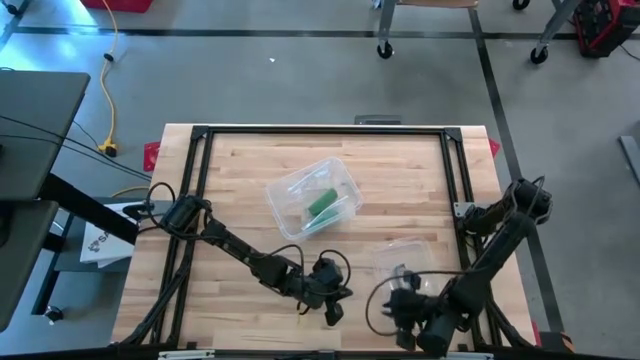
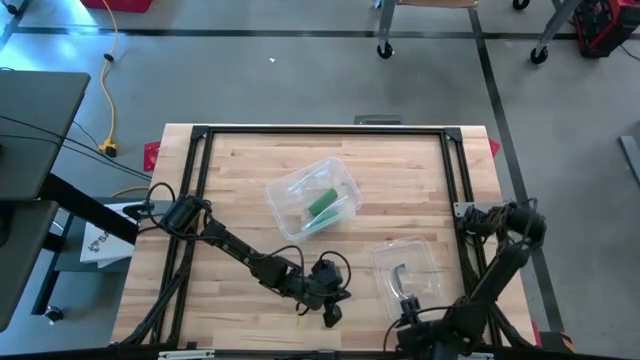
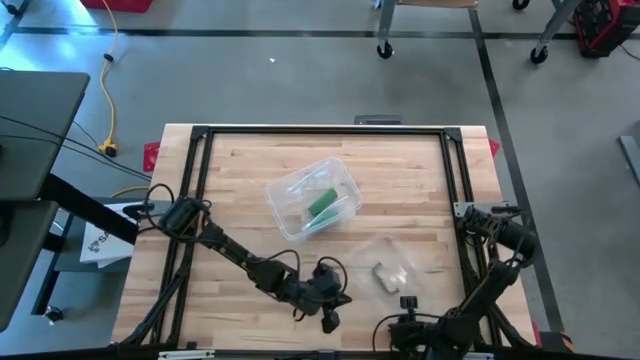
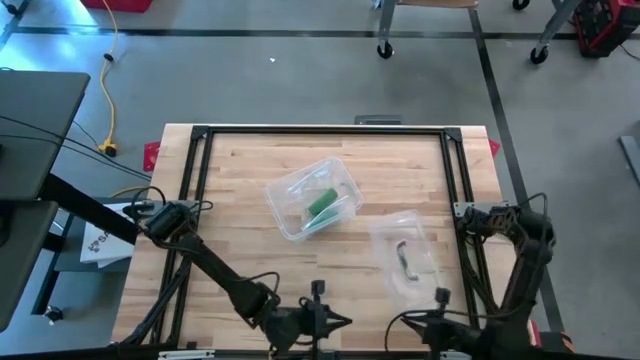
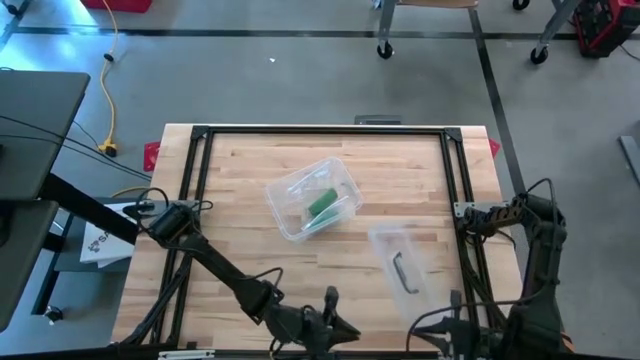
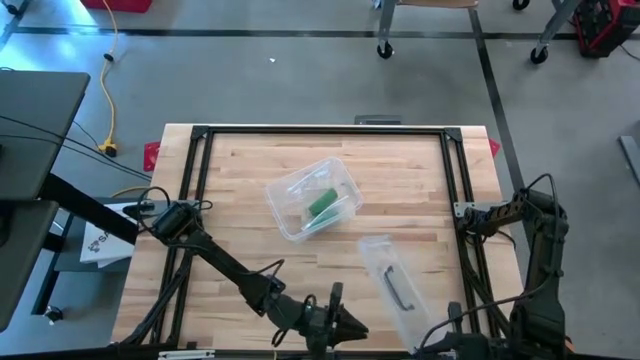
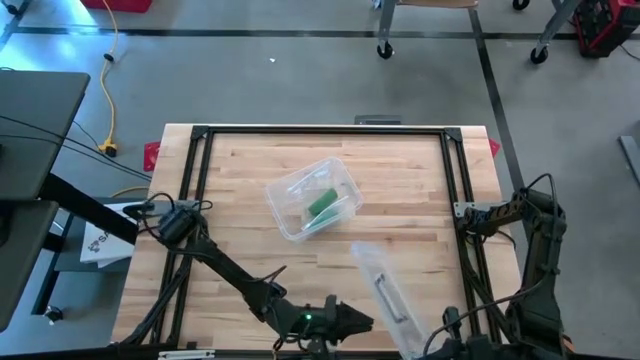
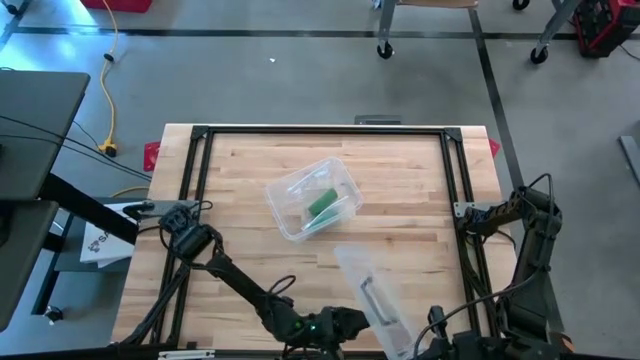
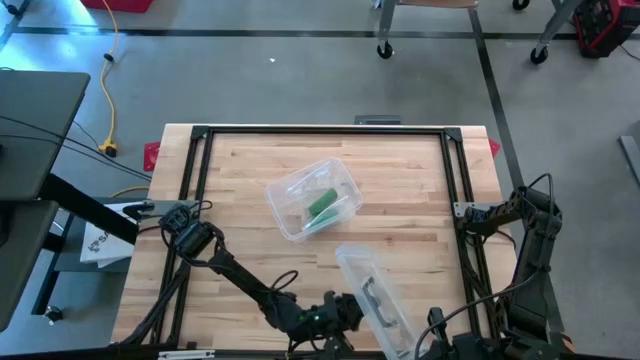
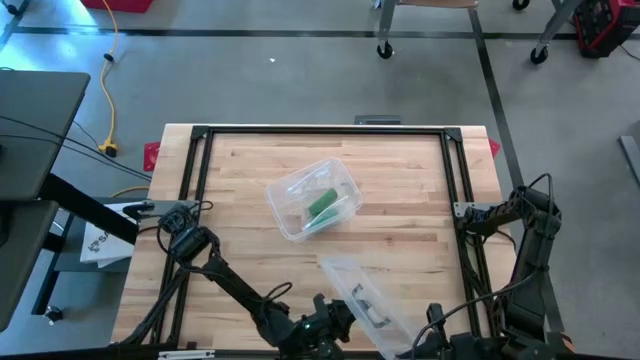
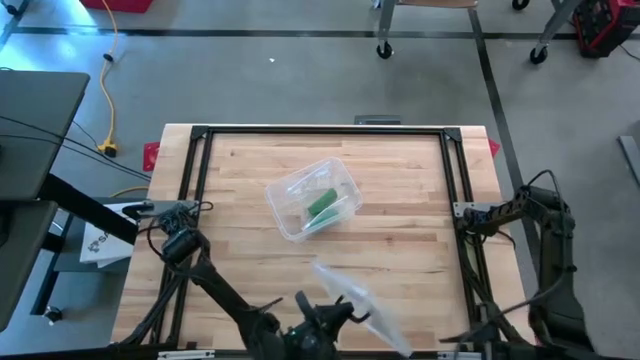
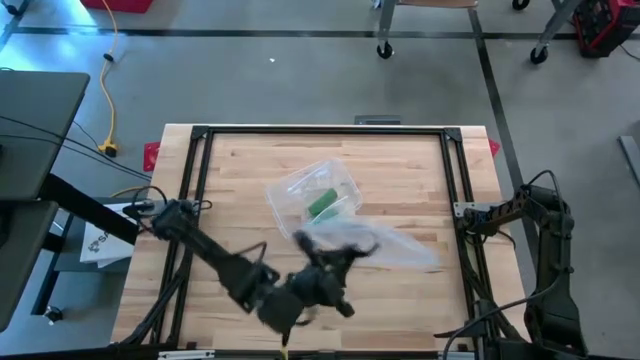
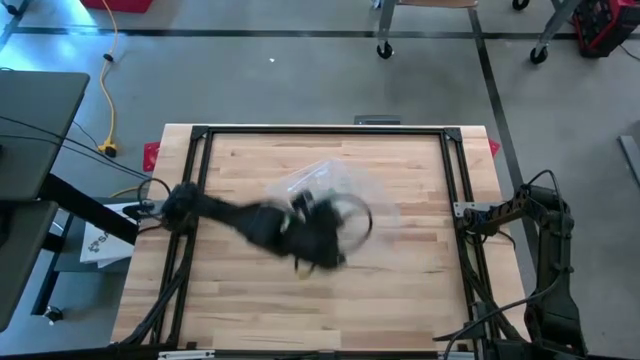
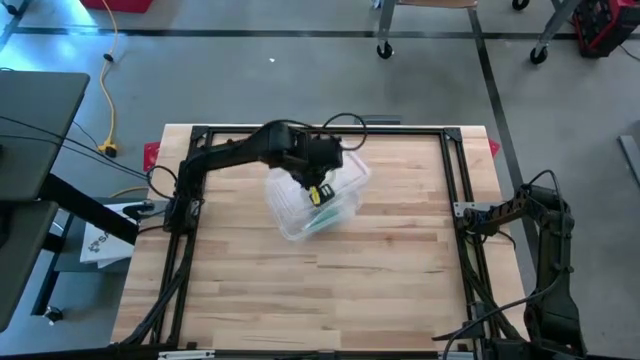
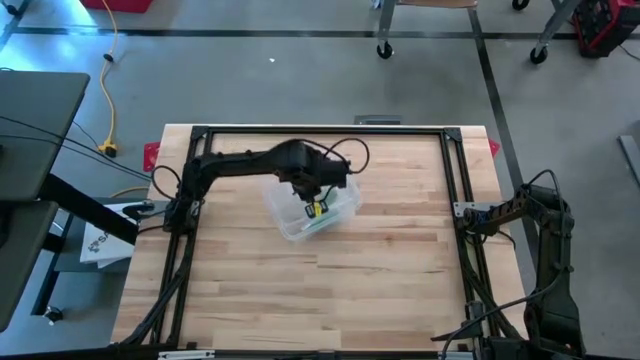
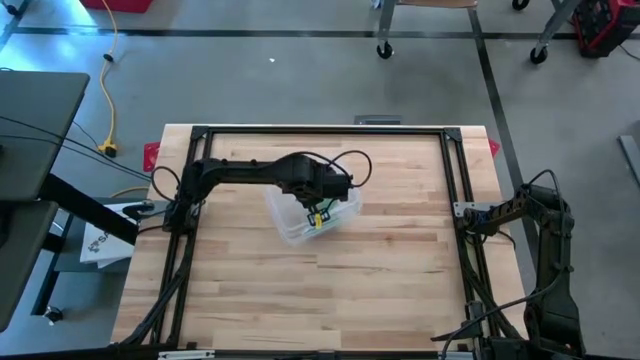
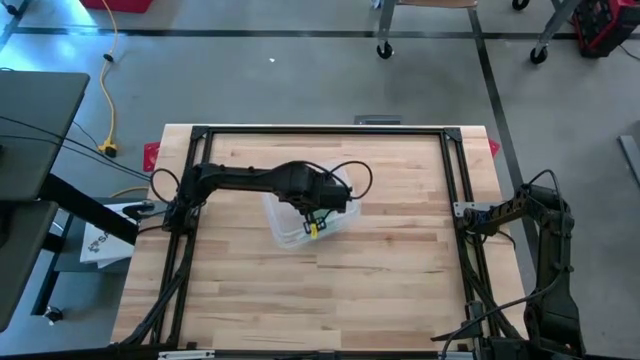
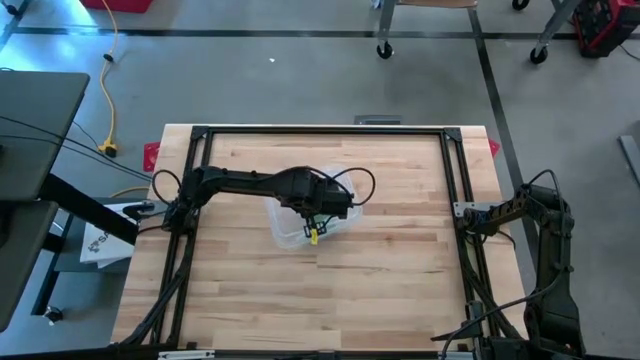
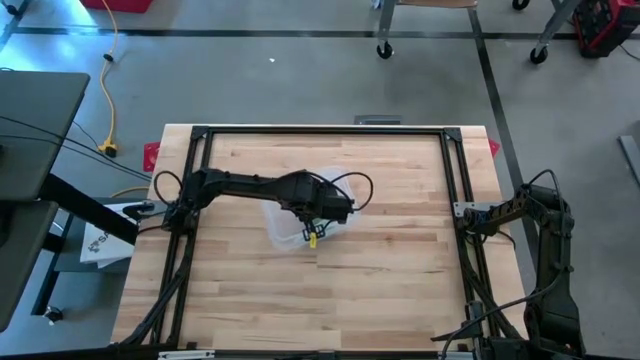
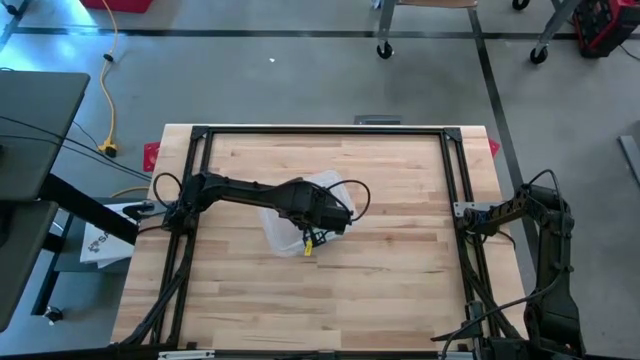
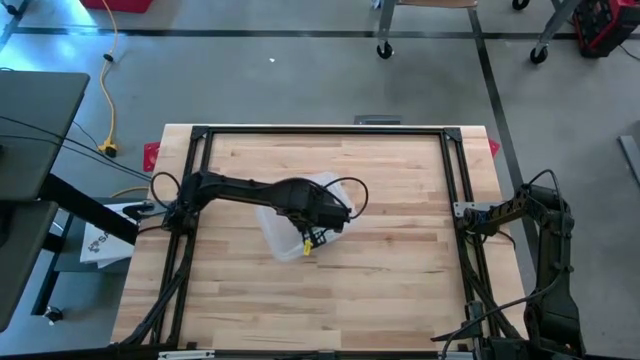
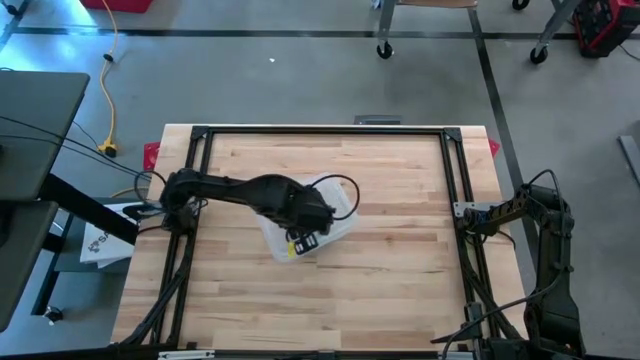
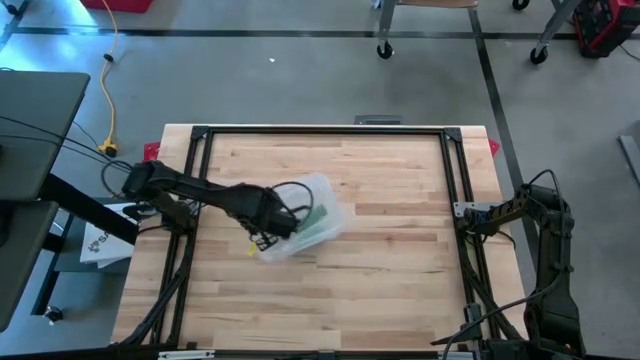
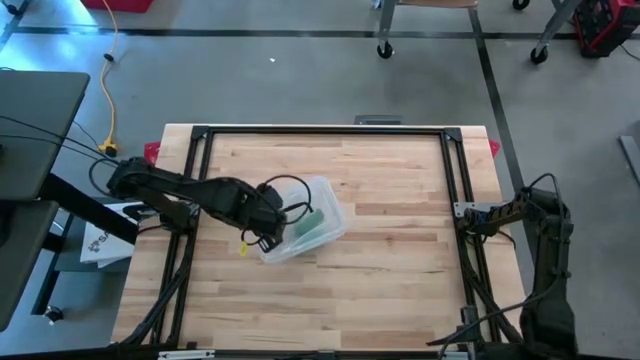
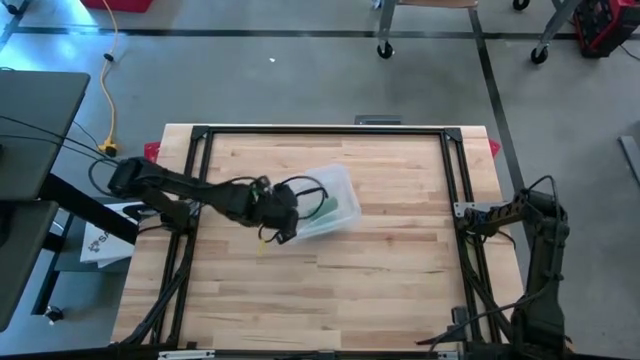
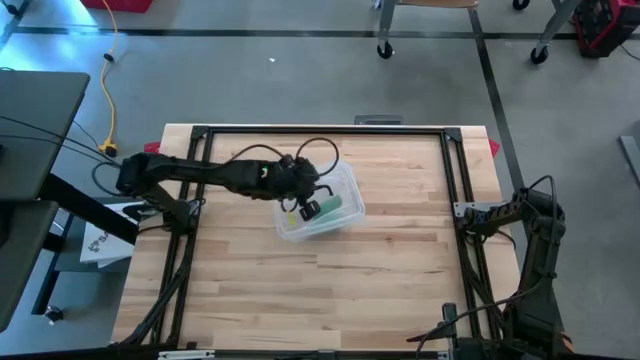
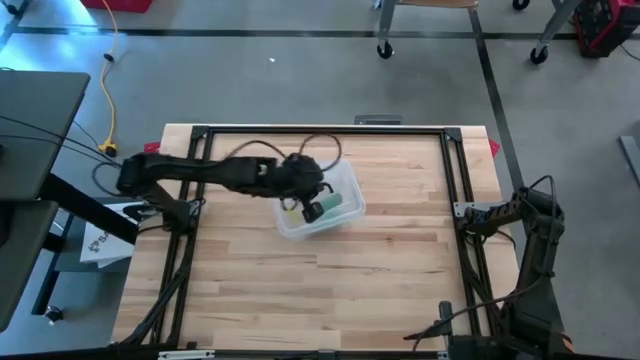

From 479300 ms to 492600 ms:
Task: Roll bandage
Close the transparent bin

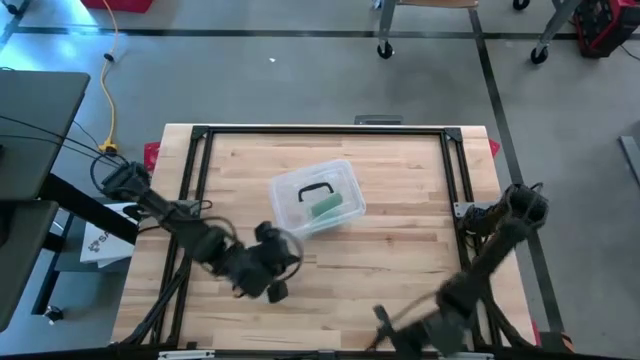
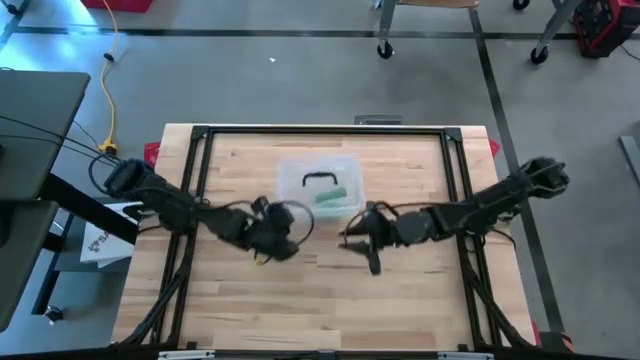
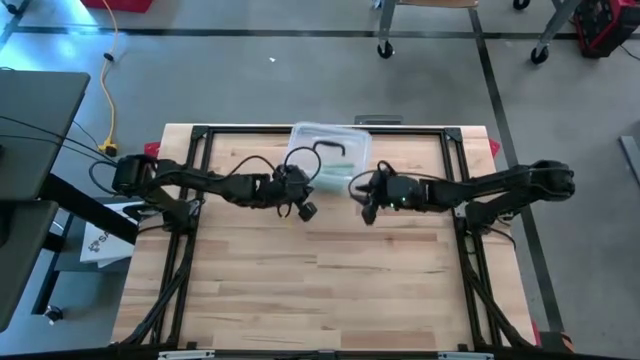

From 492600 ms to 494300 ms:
Move the transparent bin to the top center of the table

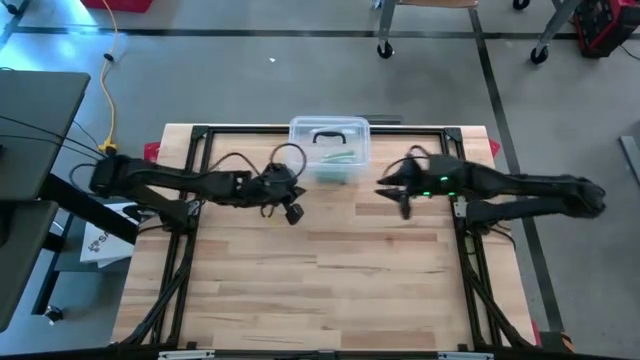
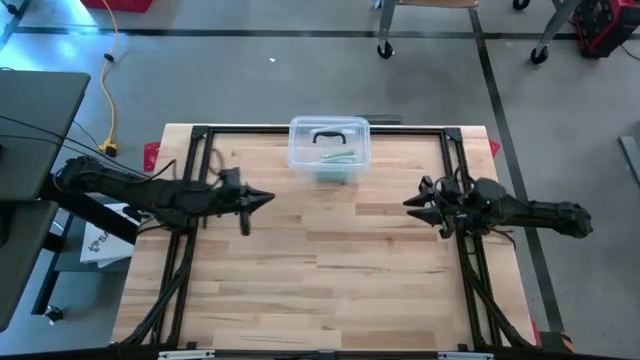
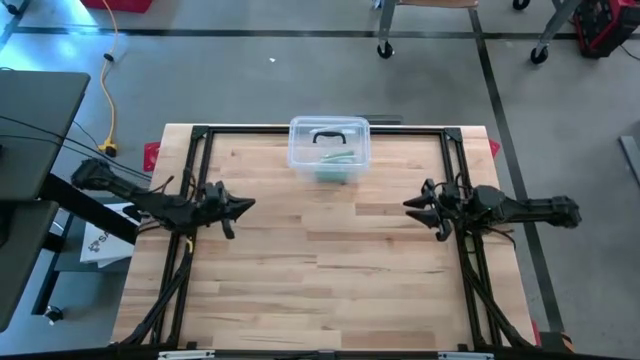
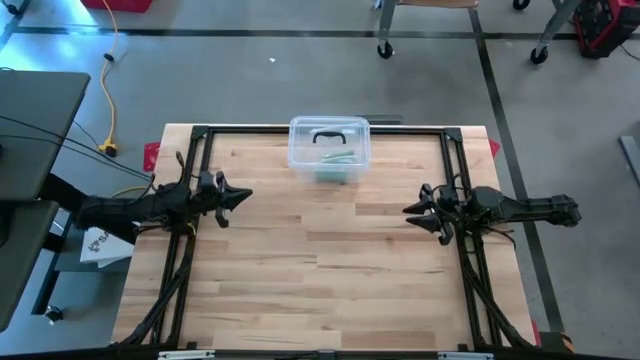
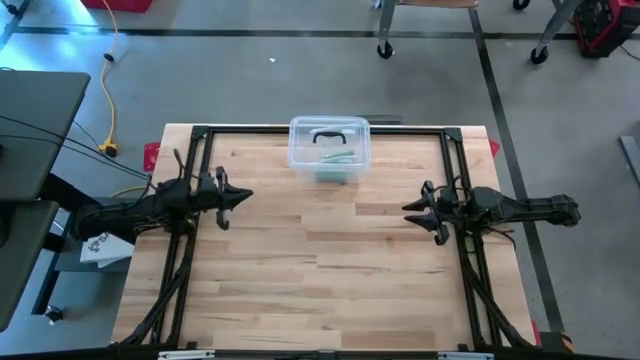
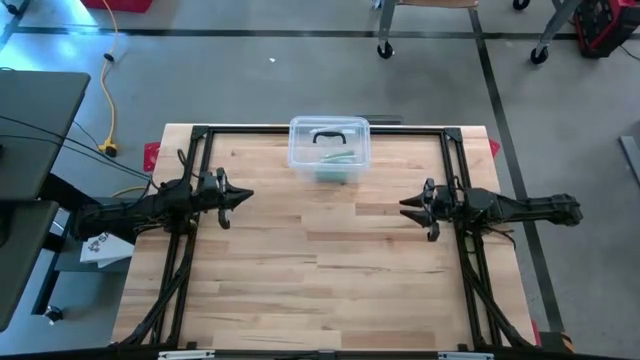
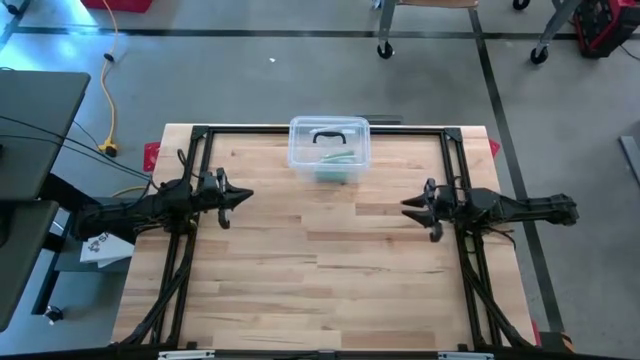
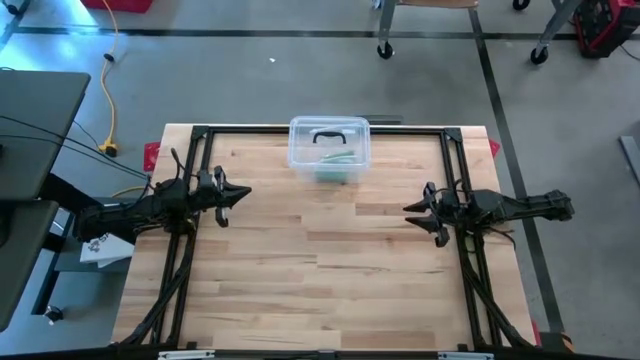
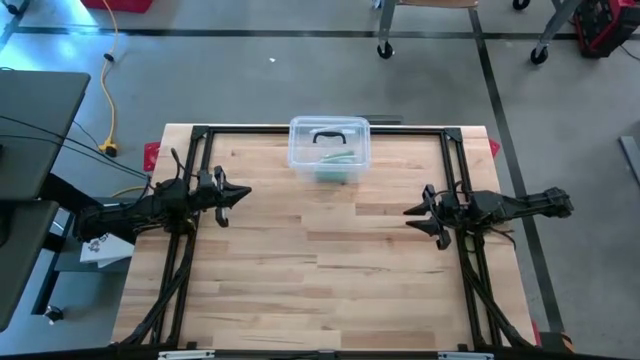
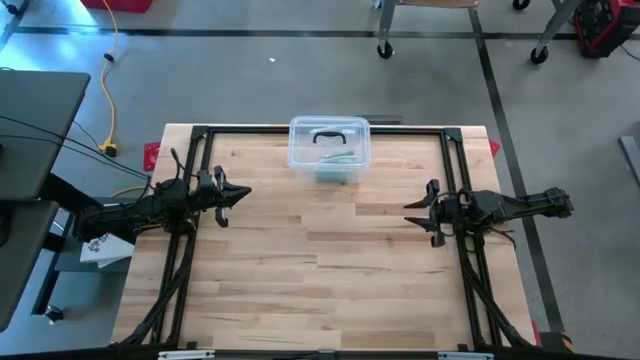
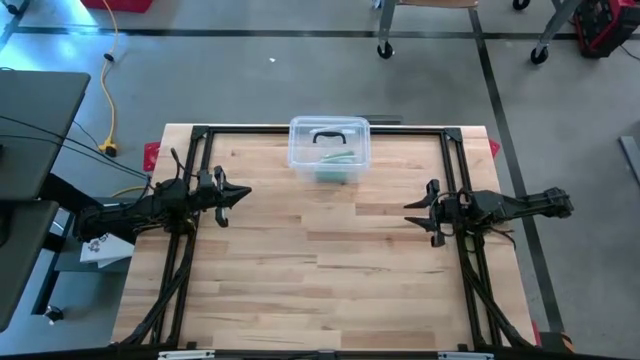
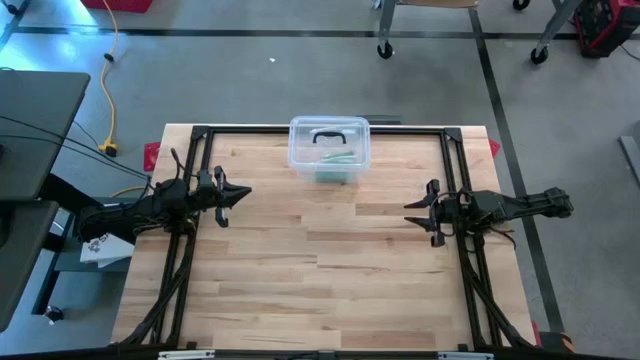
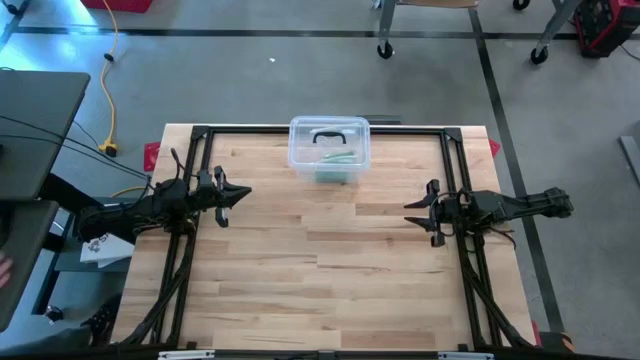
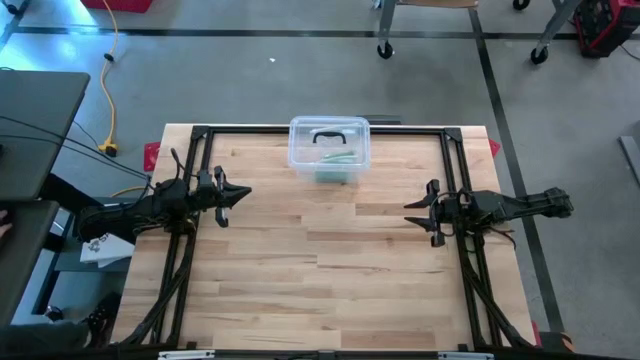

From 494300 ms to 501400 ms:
Return to Home Position
